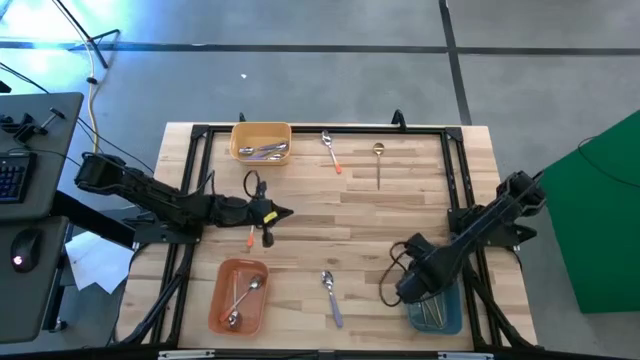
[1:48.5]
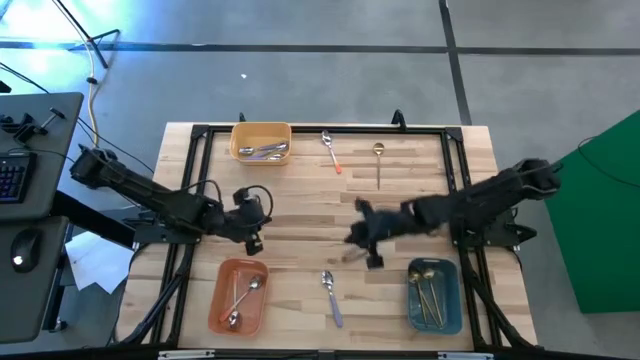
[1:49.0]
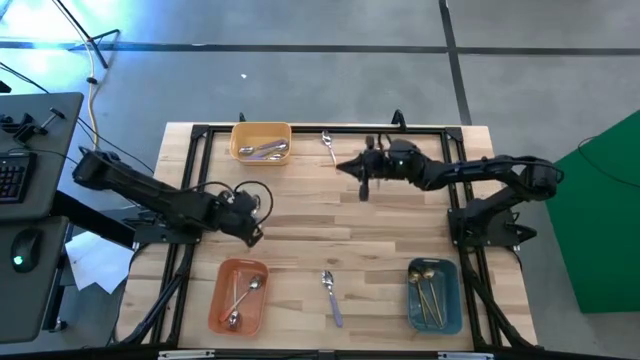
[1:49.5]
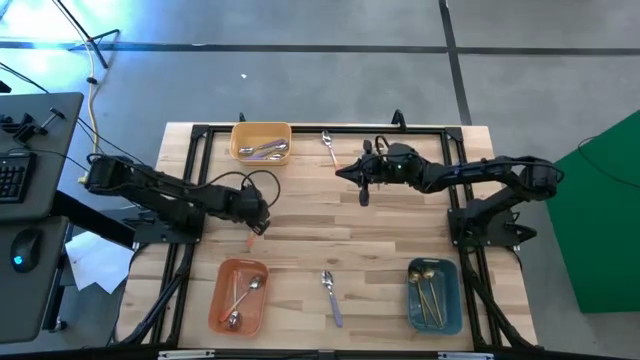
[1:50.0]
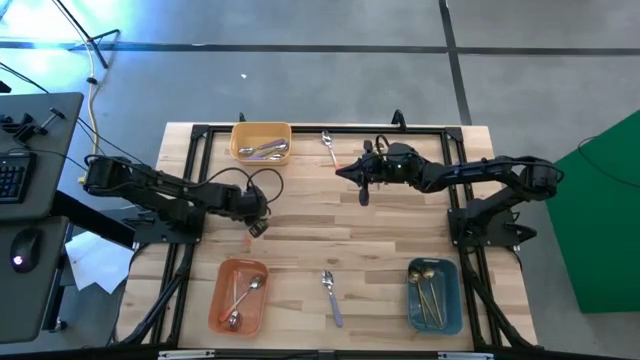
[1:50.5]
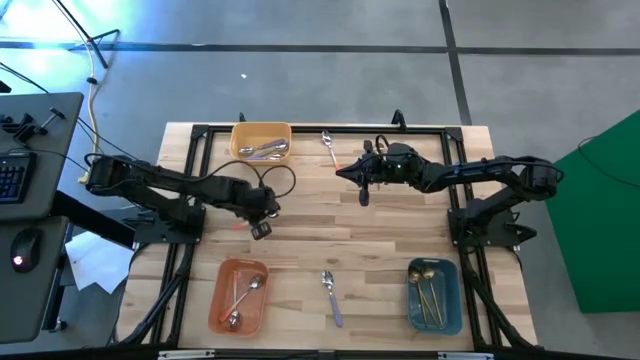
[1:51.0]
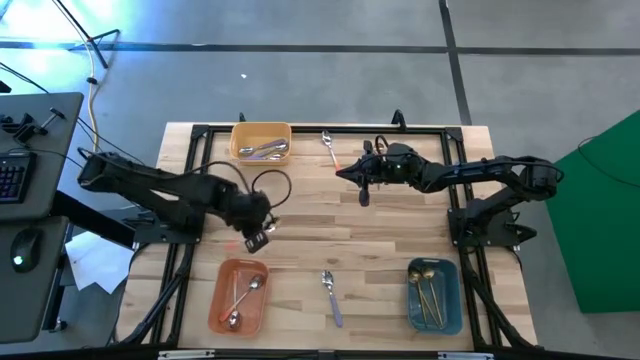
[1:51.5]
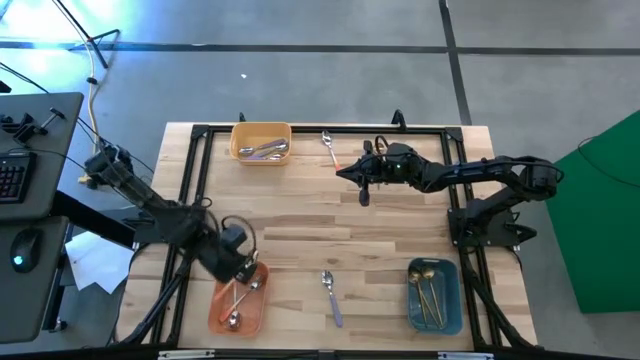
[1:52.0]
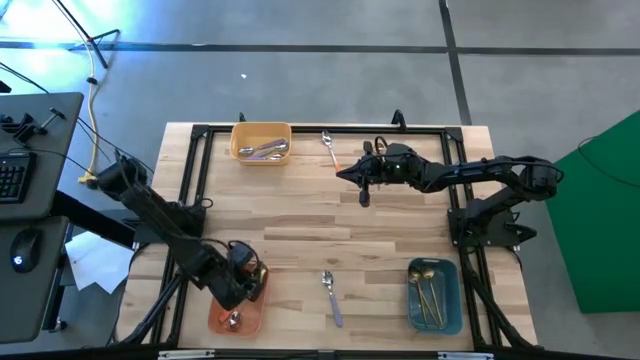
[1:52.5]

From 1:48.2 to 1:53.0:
Task: Sort silverware by color (type)
Put the orange spoon into the orange bin

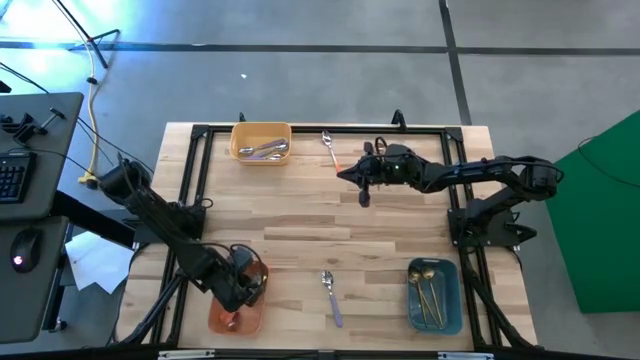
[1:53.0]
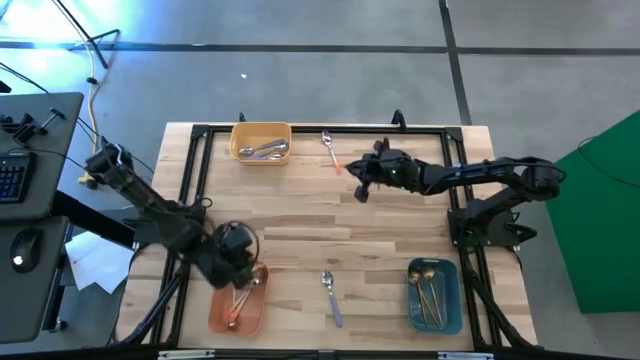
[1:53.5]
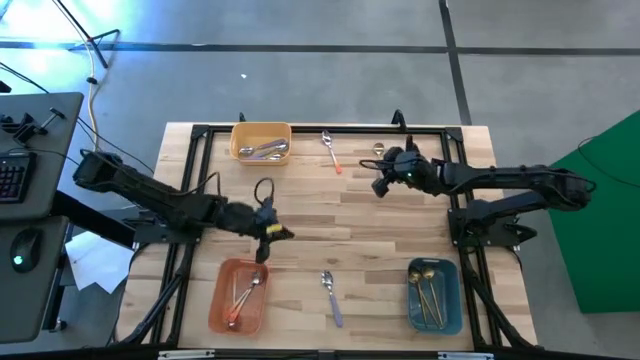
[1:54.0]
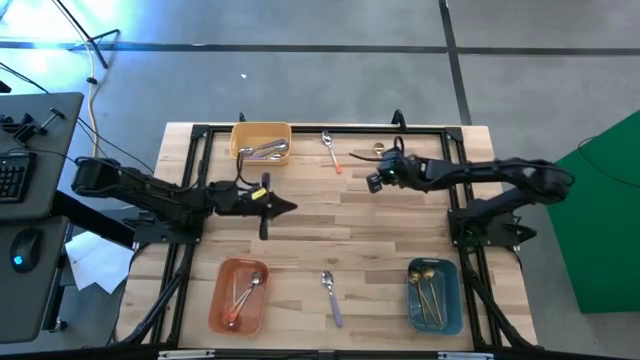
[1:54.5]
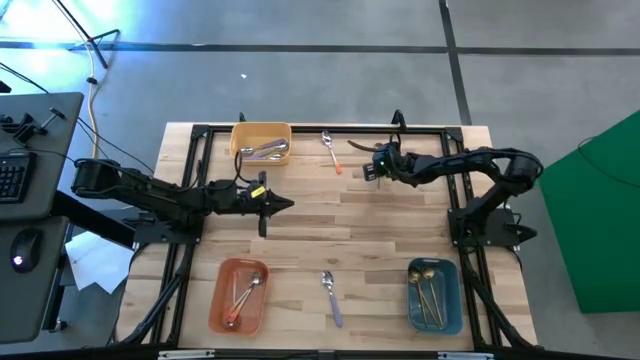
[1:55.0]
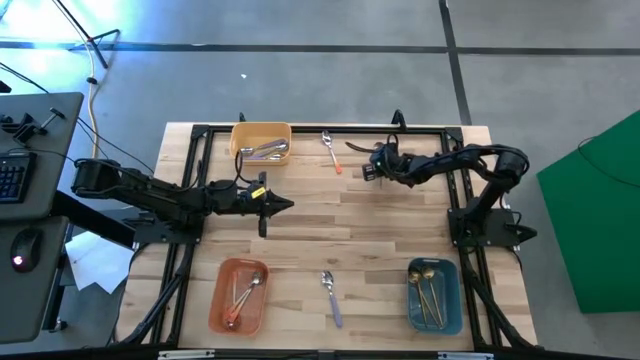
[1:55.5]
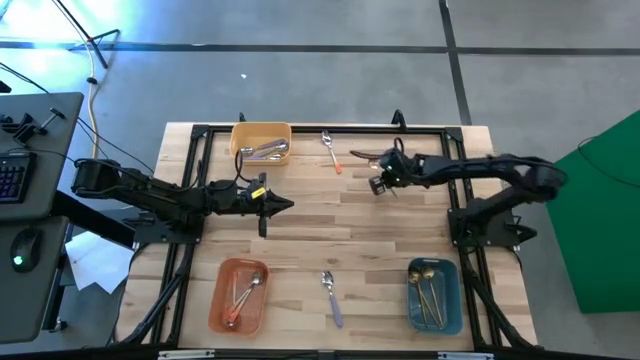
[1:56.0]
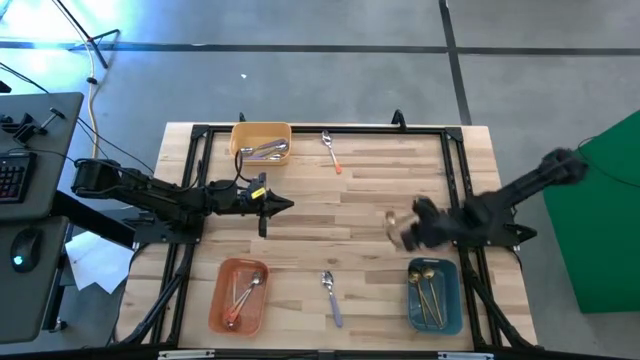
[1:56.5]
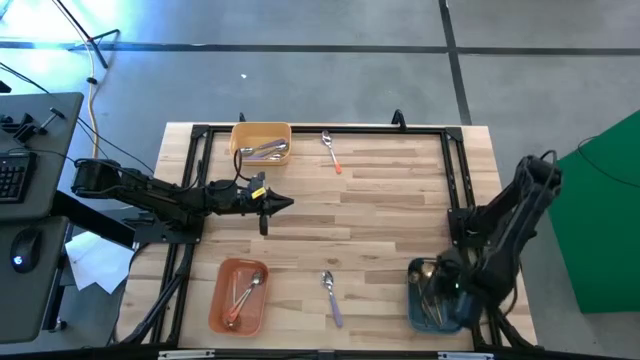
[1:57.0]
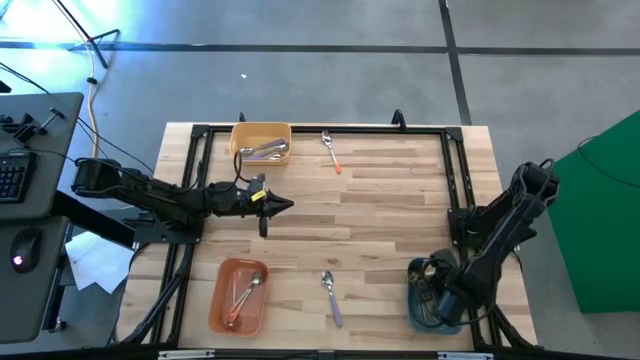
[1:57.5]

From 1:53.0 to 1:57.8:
Put the golden spoon into the blue bin

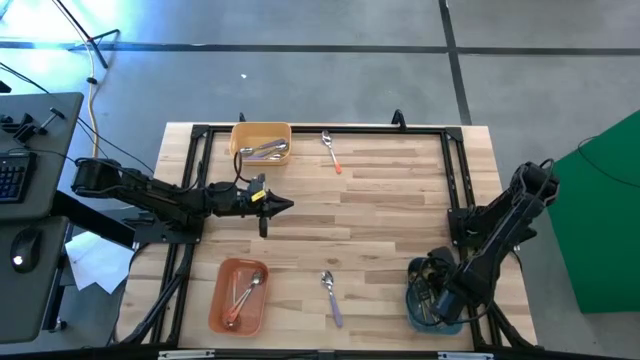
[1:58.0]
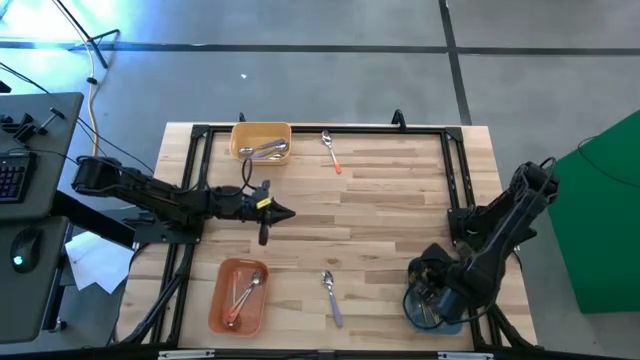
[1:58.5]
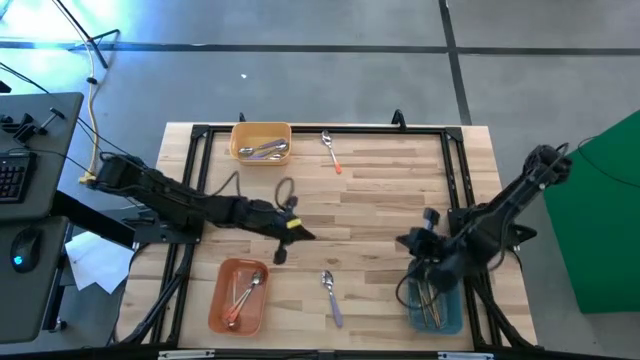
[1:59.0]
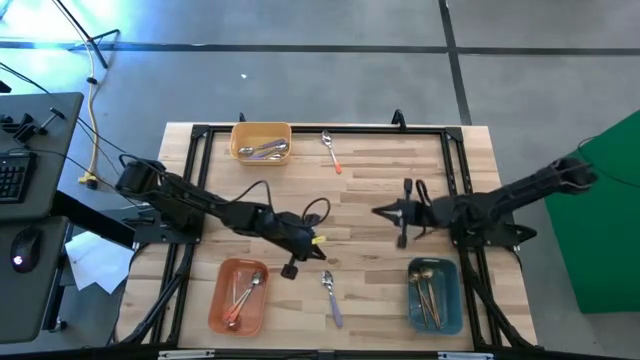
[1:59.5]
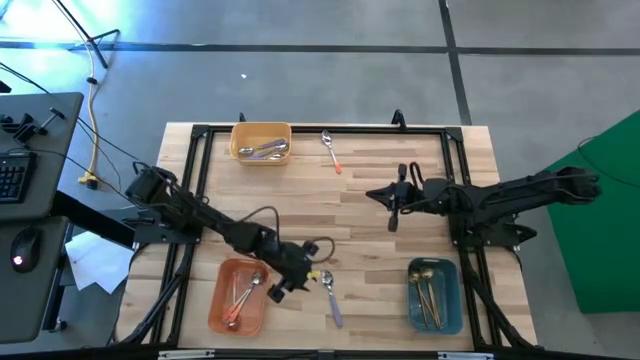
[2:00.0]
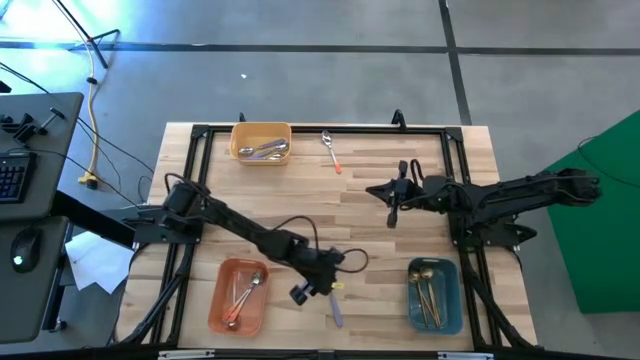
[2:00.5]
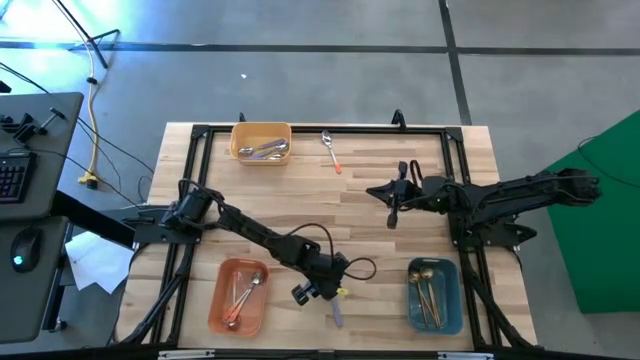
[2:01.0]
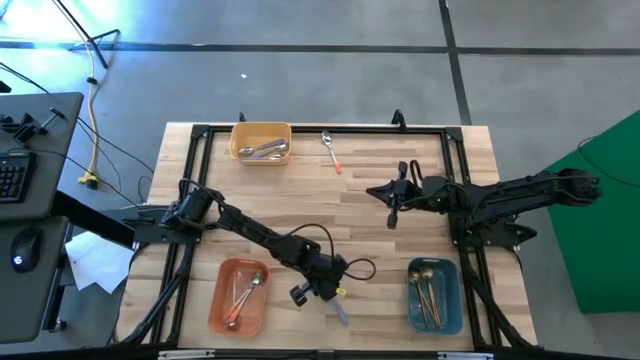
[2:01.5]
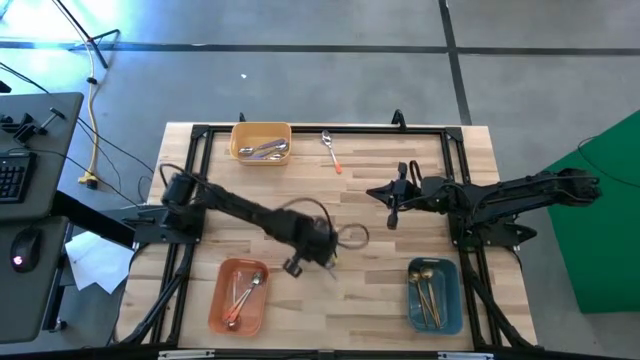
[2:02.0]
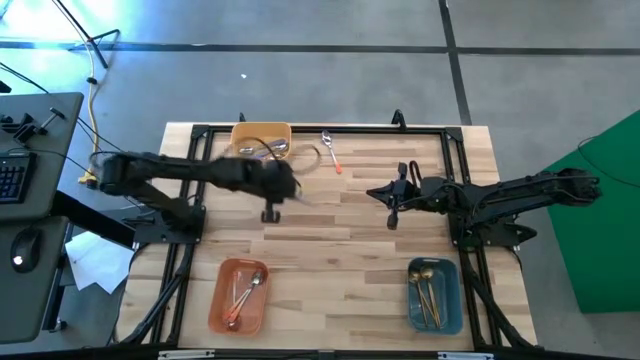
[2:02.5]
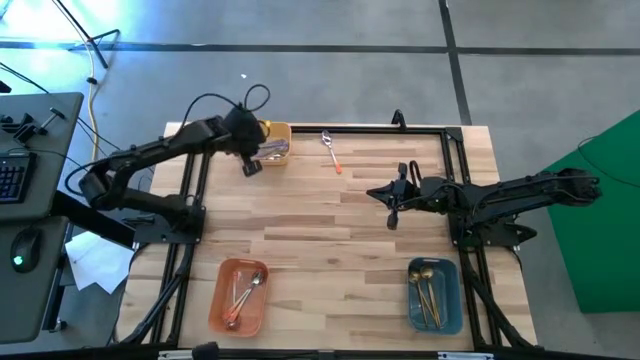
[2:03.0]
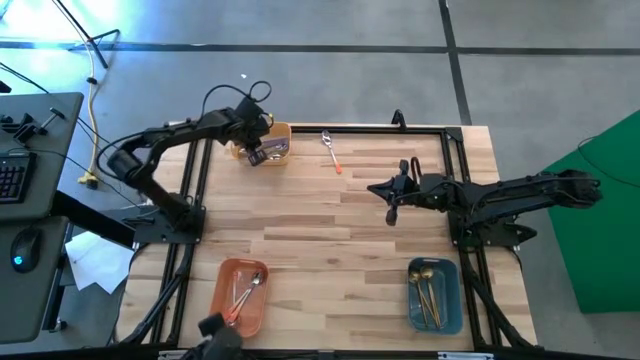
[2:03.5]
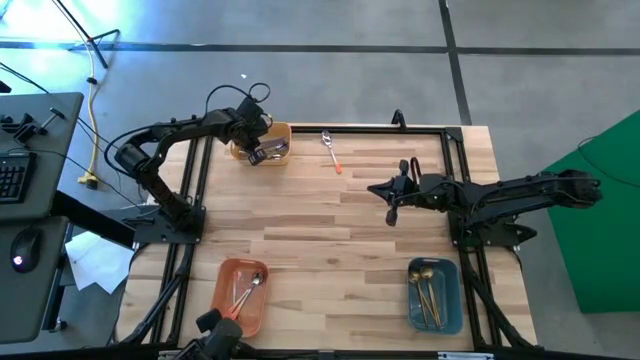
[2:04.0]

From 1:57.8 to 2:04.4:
Put the purple spoon into the yellow bin

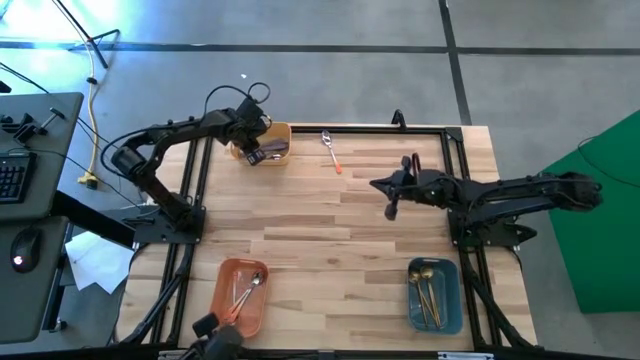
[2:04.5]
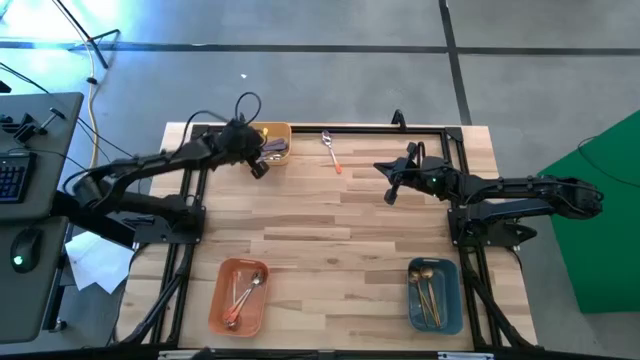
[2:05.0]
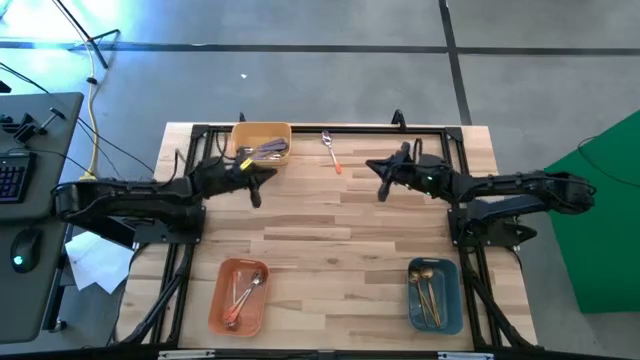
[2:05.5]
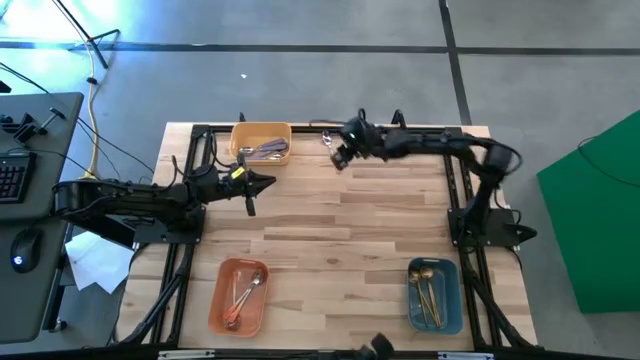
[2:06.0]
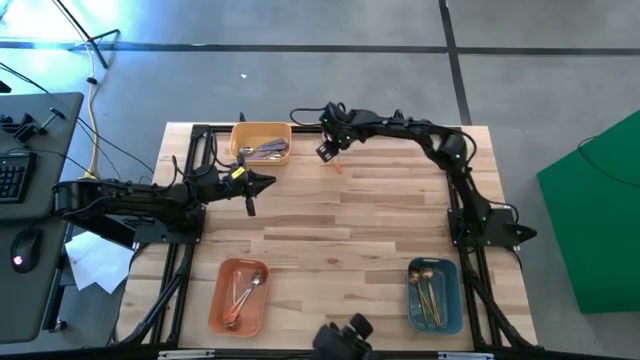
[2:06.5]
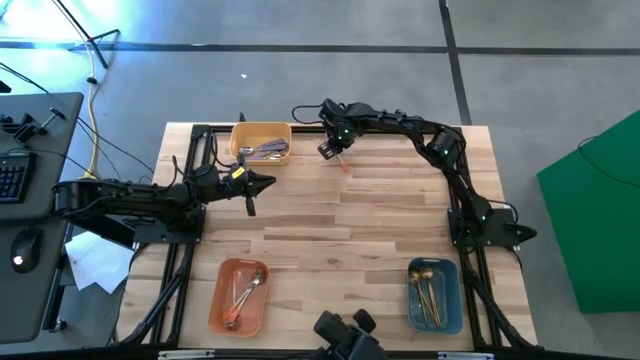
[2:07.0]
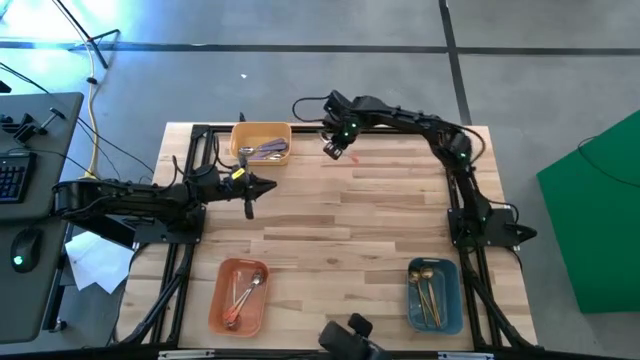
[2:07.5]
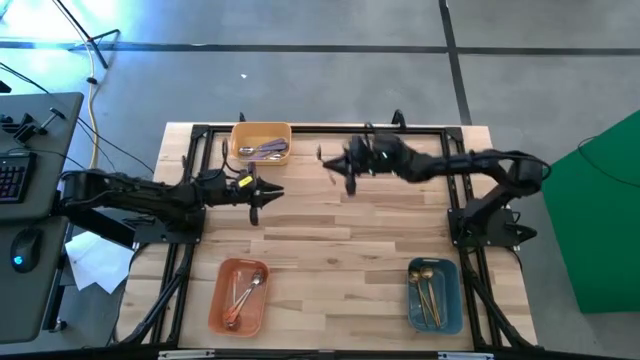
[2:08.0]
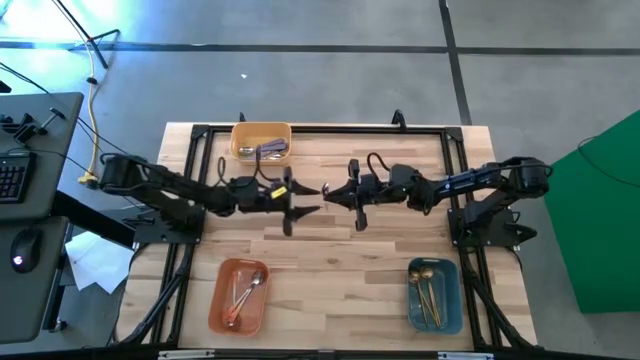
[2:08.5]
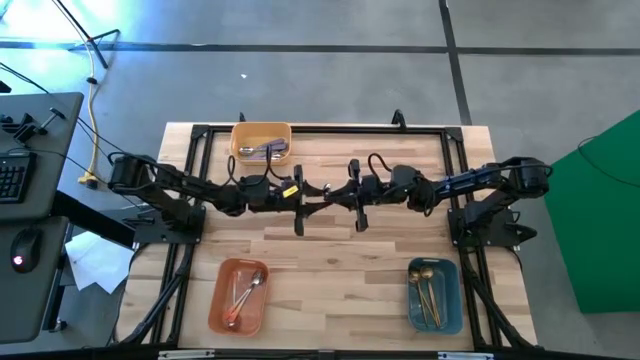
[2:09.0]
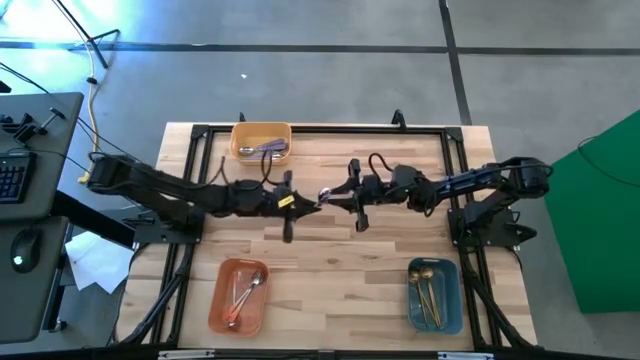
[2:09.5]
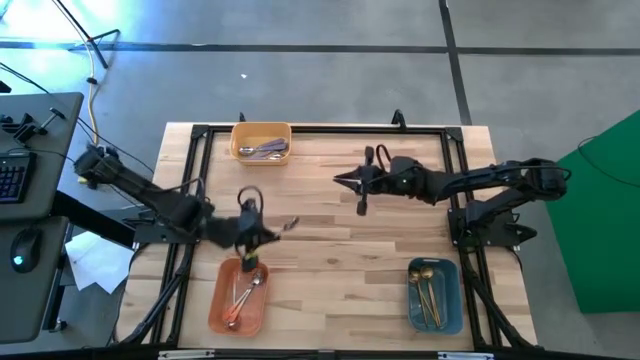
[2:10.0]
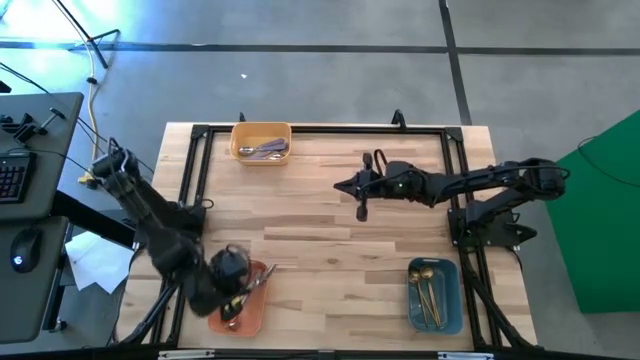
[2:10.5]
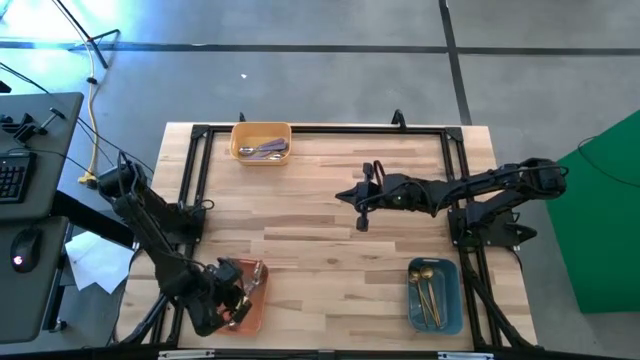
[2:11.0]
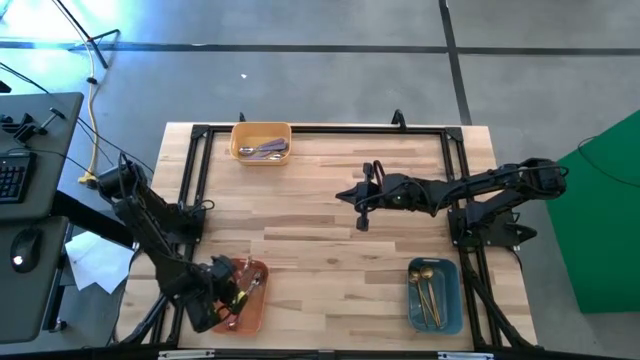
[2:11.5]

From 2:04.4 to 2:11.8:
Put the orange spoon into the orange bin
